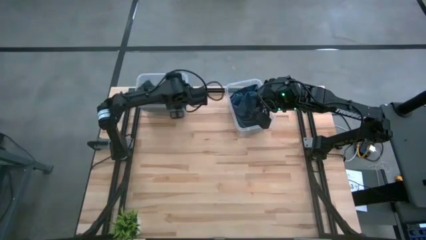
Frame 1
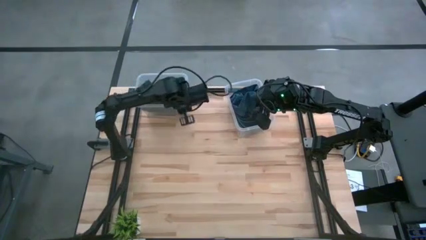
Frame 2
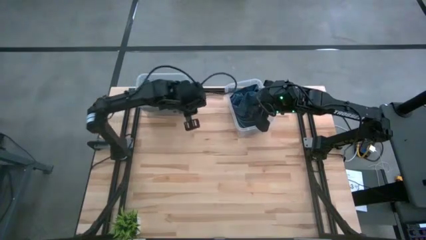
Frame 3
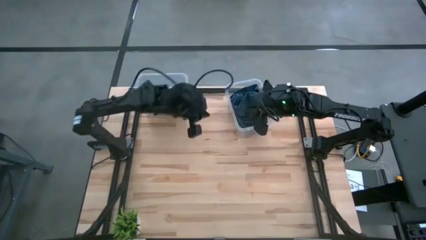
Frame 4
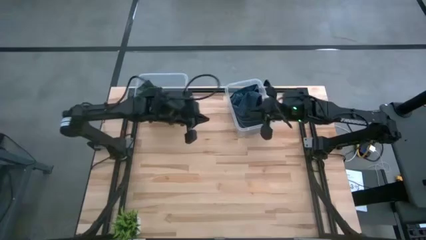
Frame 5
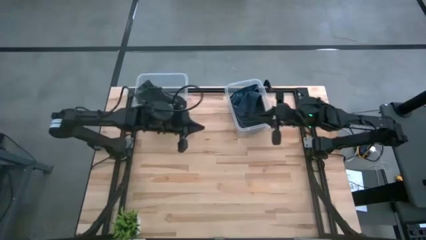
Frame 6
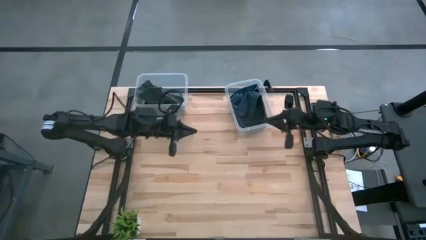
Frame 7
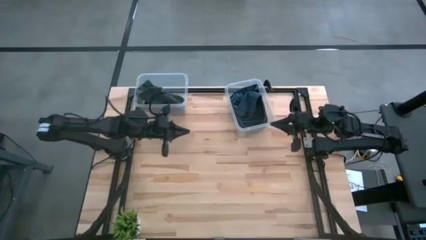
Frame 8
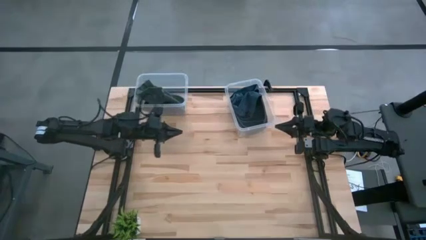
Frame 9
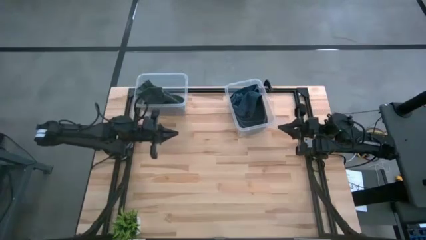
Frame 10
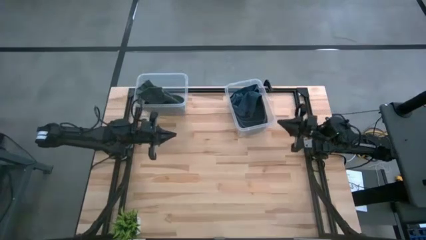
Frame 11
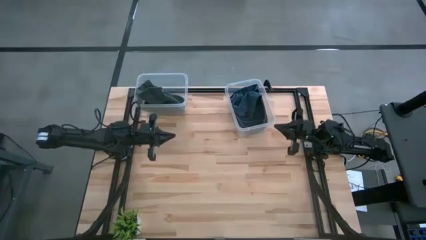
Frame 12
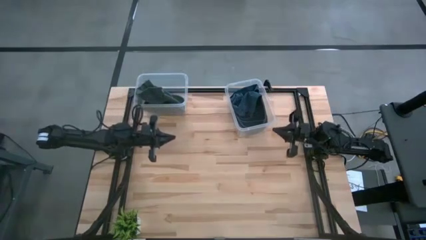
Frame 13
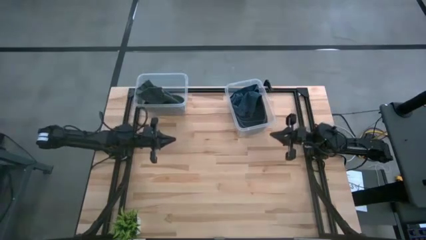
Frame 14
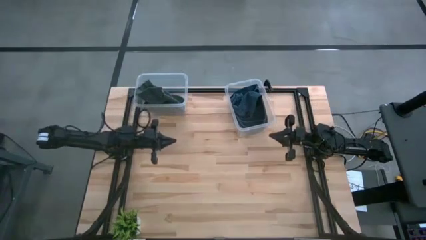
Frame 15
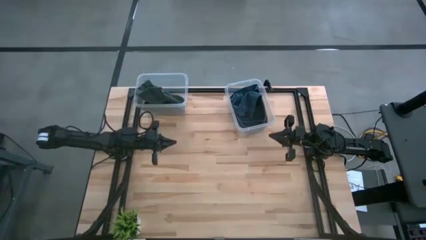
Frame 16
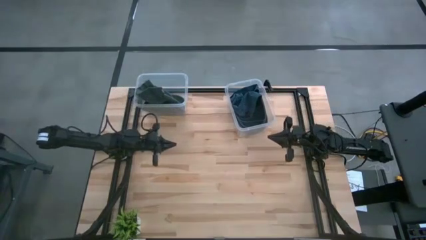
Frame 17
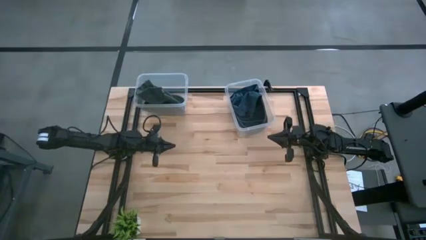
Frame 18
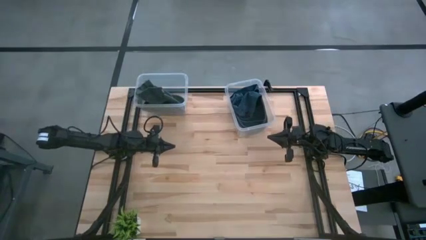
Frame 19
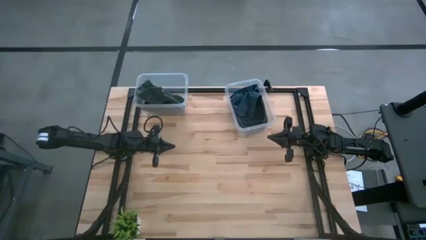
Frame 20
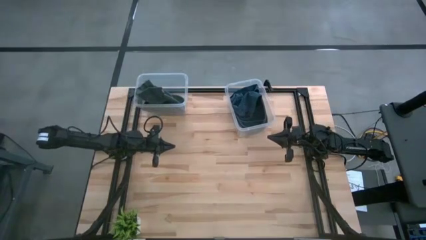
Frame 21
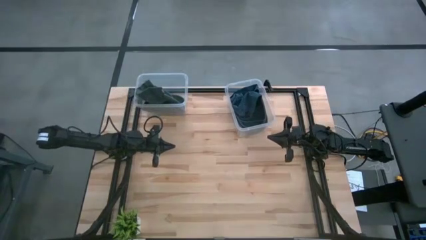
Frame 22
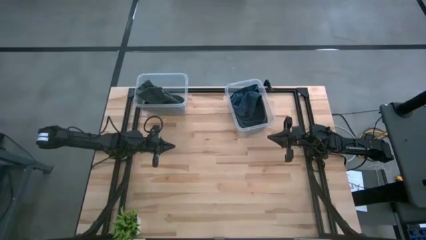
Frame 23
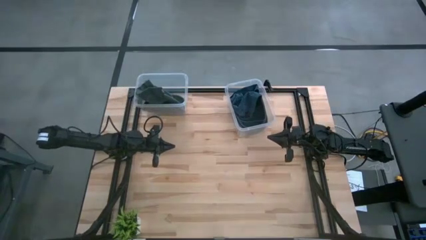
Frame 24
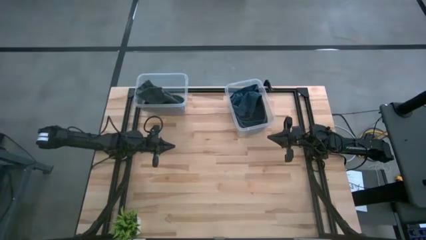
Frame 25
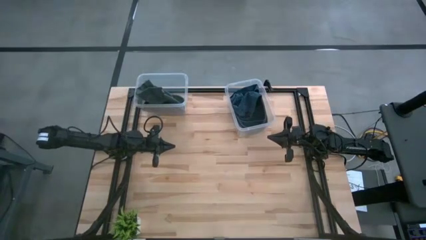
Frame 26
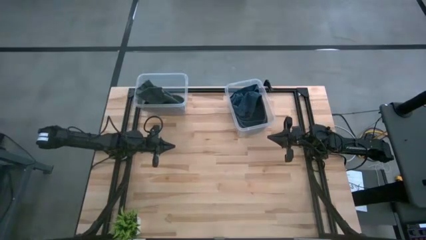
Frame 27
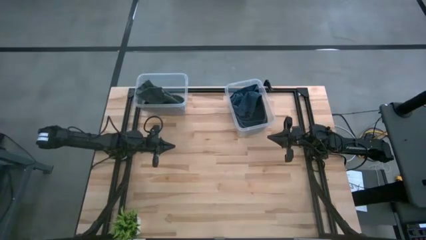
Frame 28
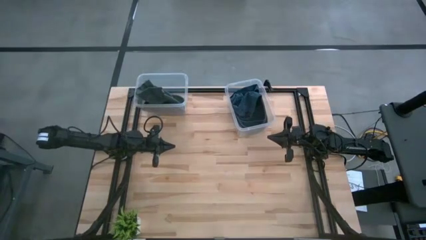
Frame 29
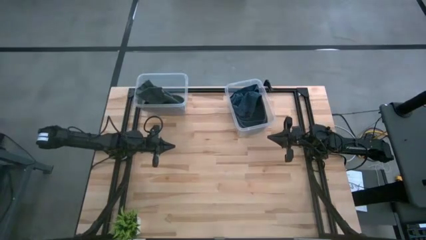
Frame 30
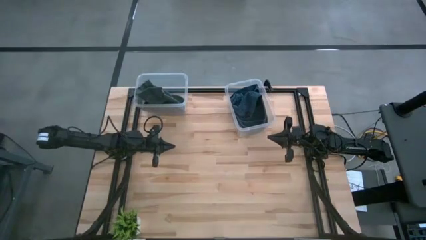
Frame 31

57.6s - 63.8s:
Task: Pick & Place hat
Return to Home Position

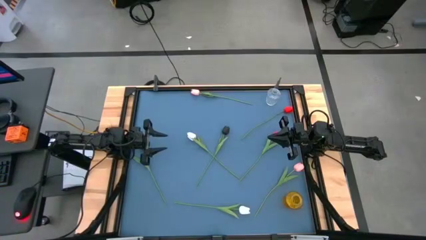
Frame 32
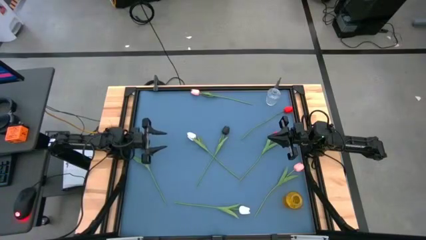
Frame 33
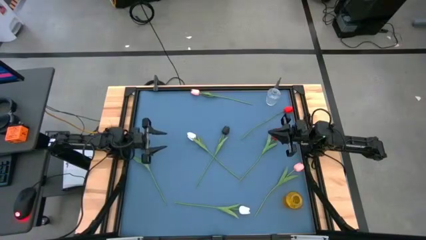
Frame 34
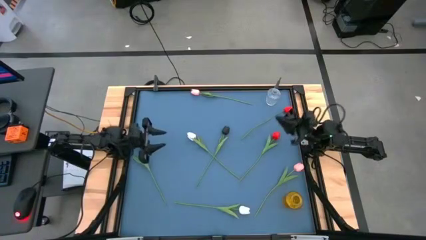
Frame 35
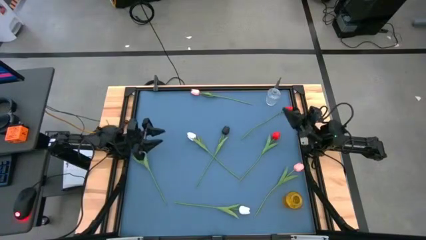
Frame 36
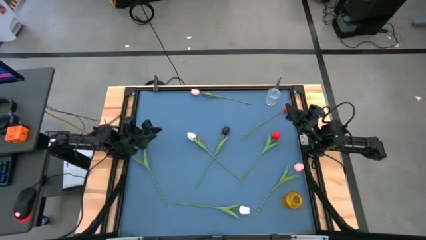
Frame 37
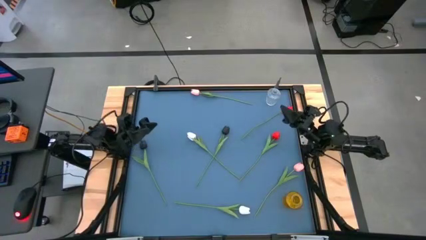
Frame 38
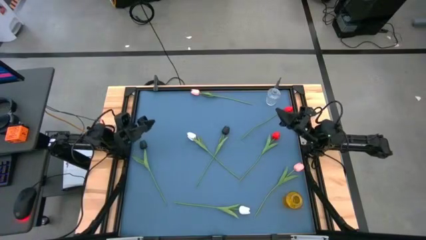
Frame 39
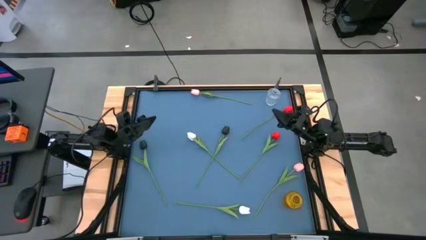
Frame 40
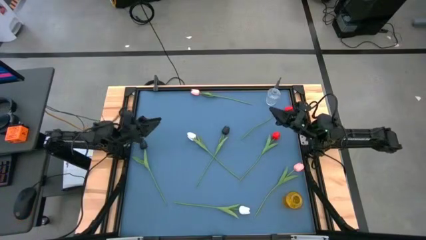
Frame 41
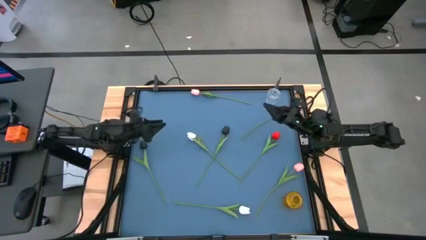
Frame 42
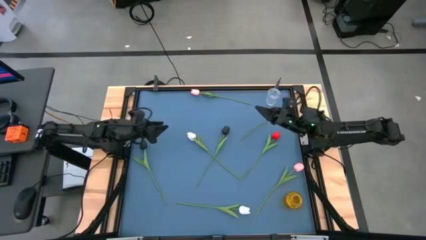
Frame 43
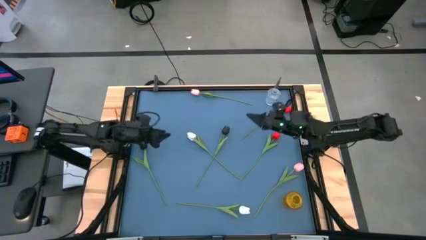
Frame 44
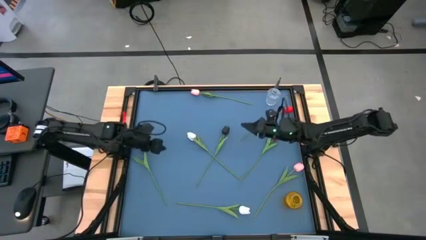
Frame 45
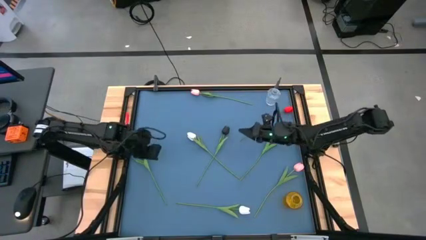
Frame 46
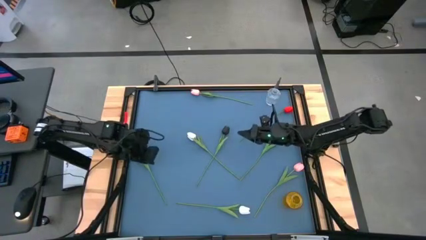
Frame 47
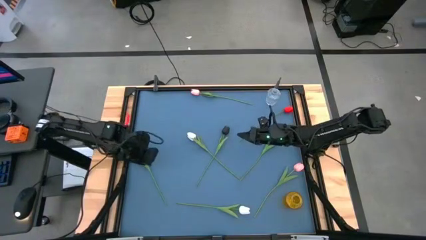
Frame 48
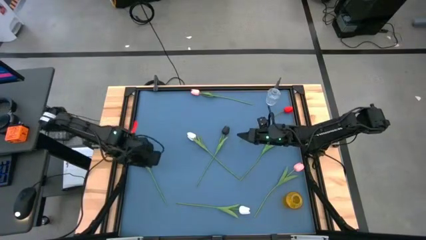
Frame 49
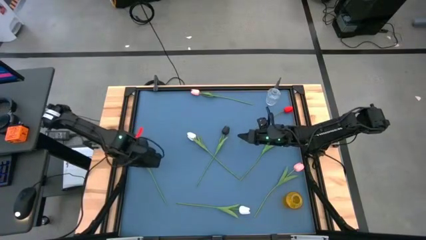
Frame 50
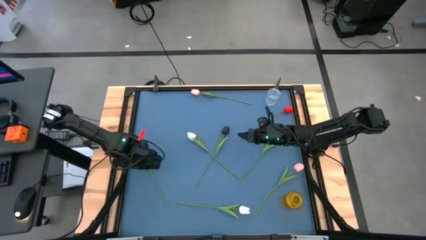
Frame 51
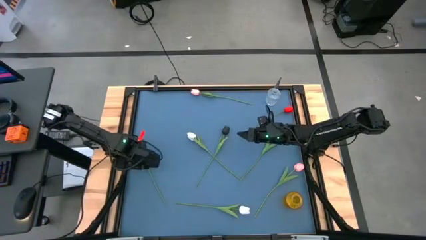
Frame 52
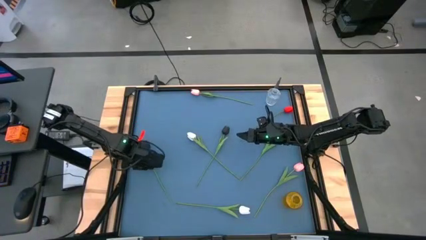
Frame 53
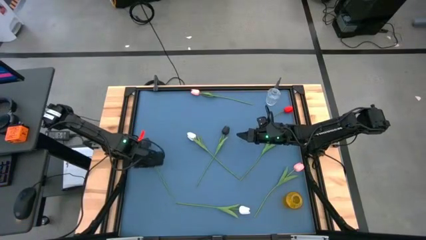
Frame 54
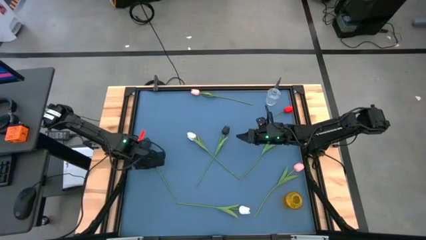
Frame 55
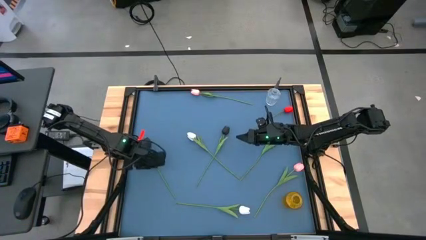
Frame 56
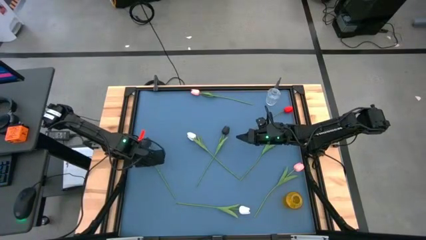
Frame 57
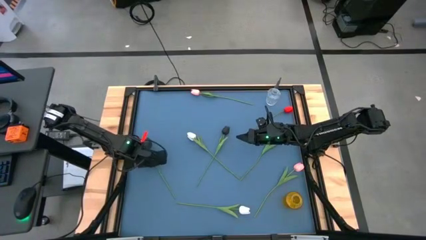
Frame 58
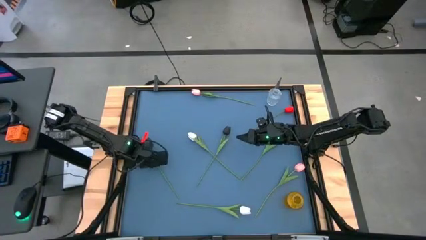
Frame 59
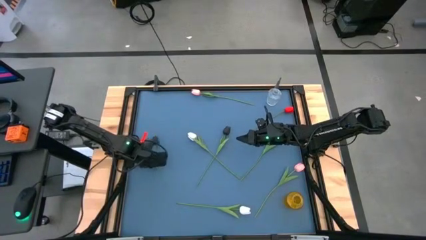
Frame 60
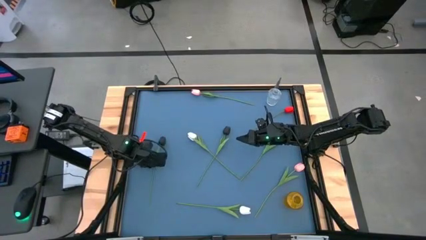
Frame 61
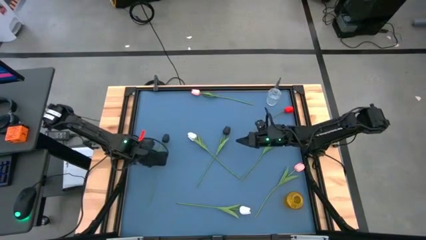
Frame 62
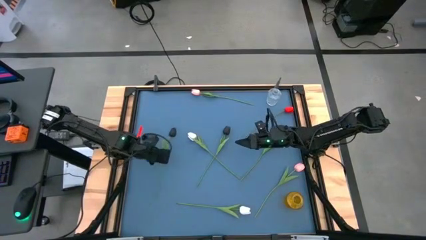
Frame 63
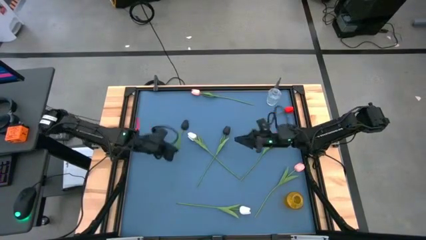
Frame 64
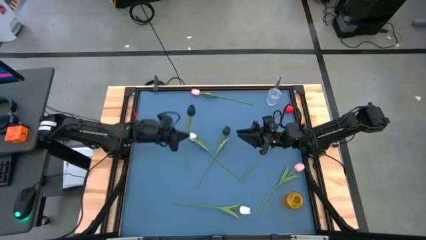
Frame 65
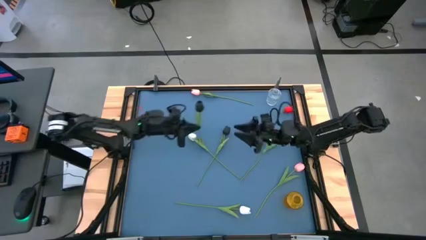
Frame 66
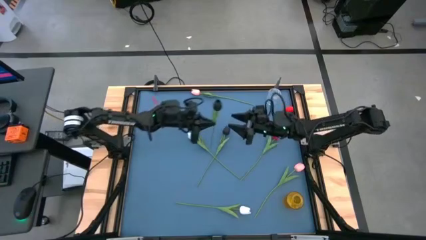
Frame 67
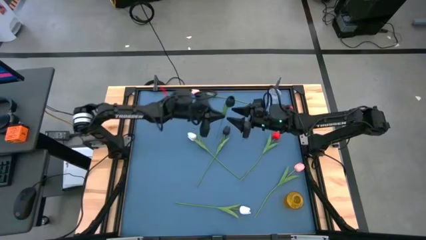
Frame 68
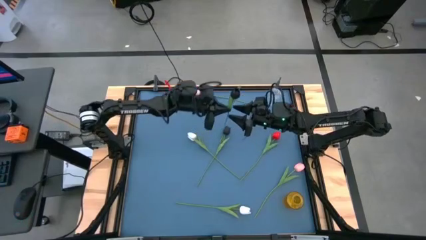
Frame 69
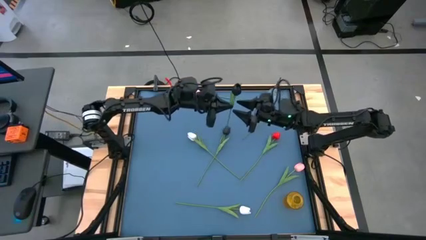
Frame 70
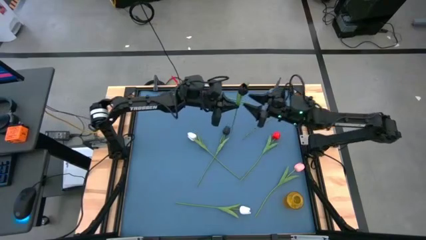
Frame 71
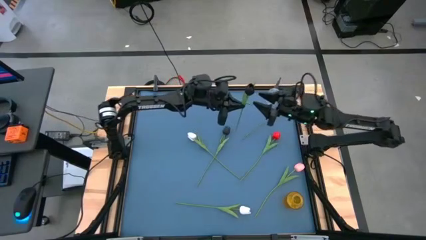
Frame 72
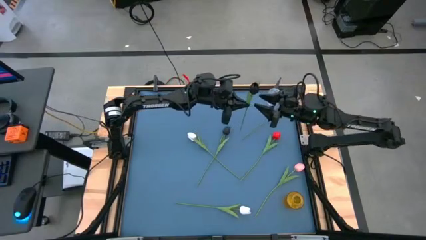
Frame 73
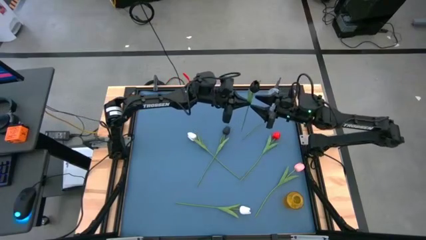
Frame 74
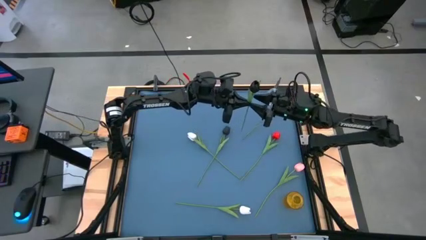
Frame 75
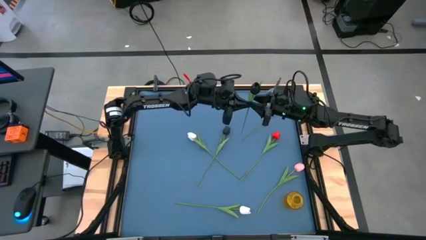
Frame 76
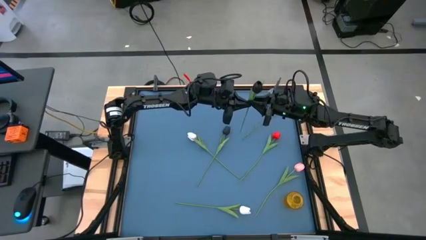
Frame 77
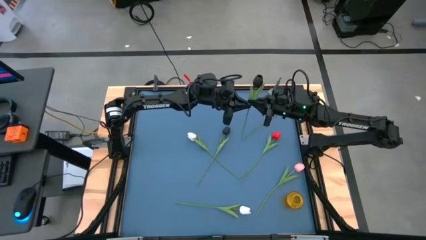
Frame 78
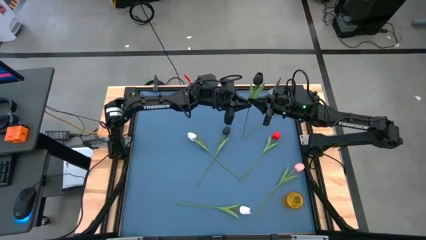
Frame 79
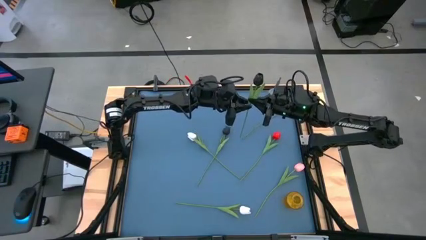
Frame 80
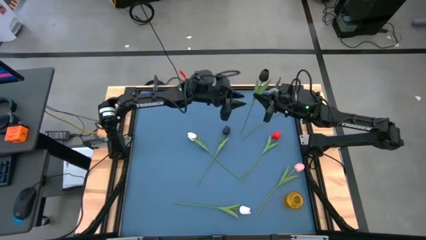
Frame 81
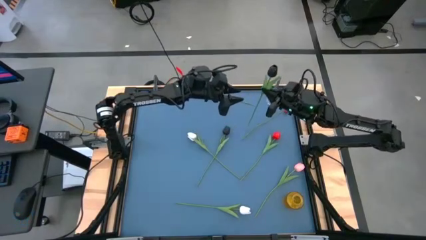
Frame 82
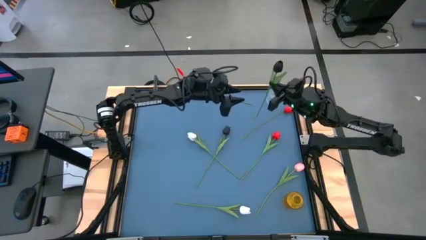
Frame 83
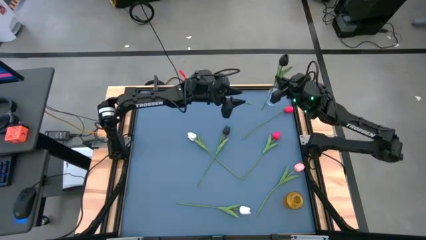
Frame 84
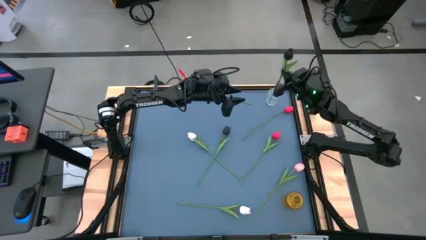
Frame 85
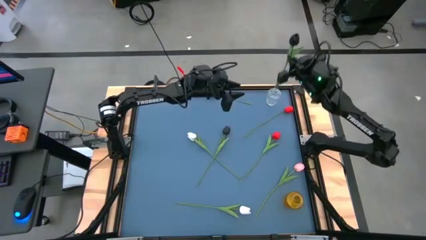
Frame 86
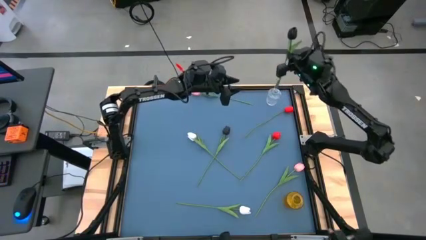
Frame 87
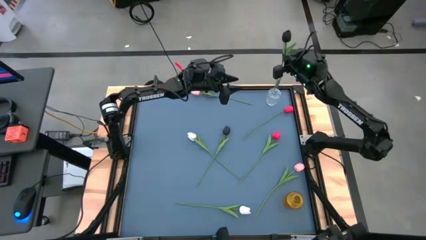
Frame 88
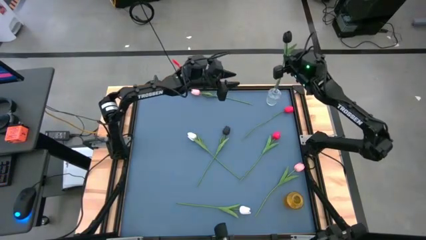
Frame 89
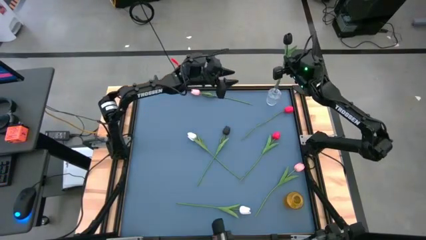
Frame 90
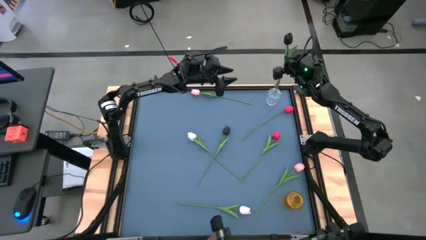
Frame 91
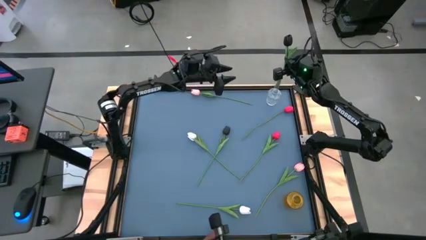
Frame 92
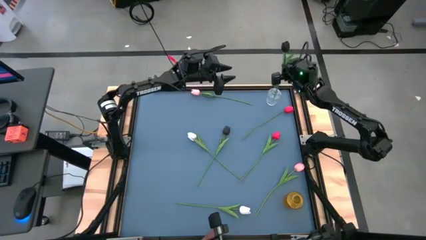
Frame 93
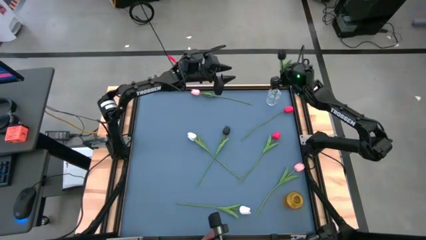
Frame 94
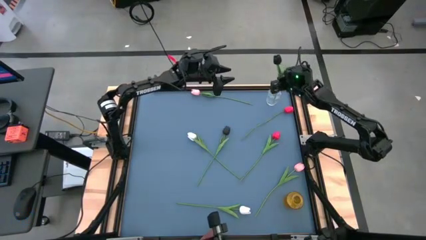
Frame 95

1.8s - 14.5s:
Task: Sort flowers into vase by color
Put the left black flower into the transparent vase
